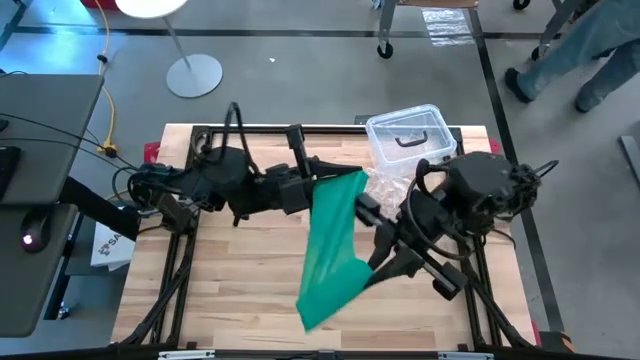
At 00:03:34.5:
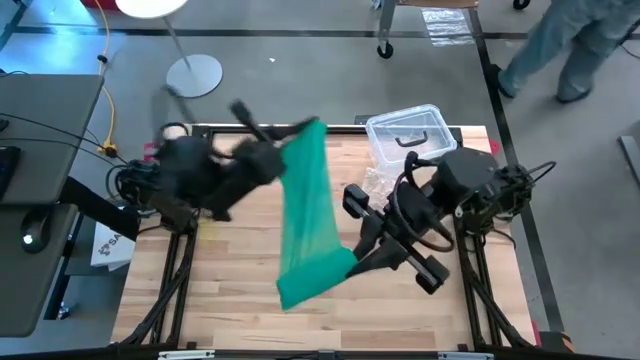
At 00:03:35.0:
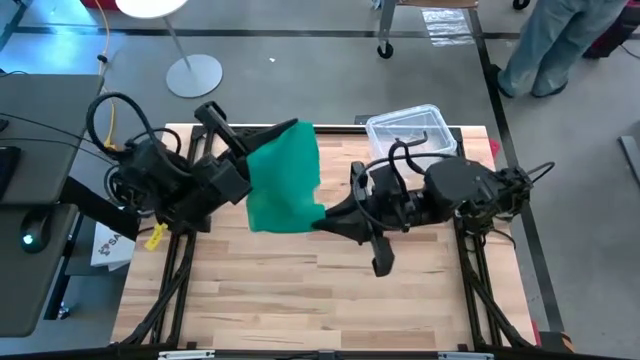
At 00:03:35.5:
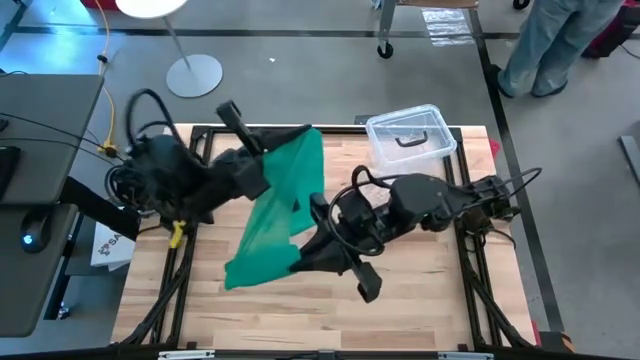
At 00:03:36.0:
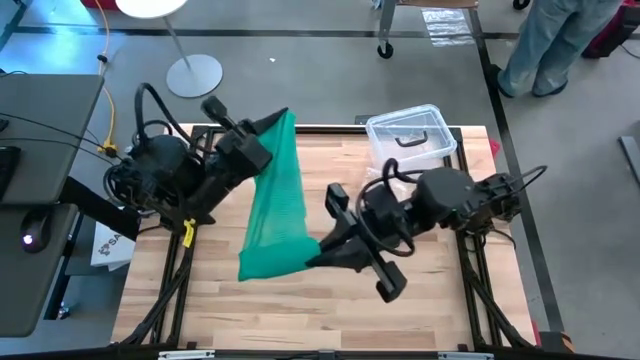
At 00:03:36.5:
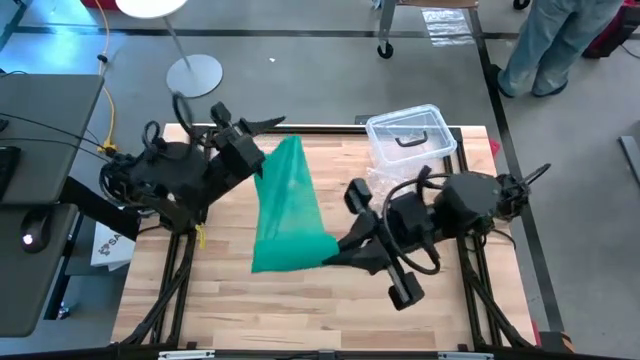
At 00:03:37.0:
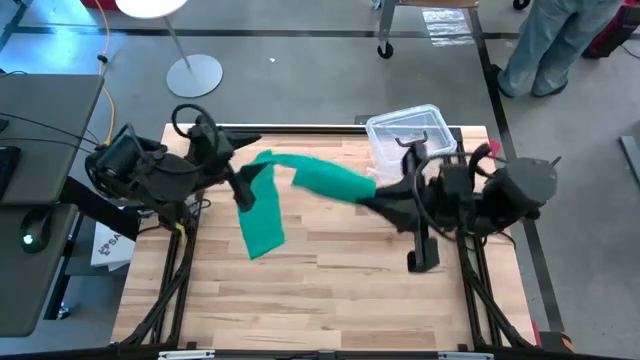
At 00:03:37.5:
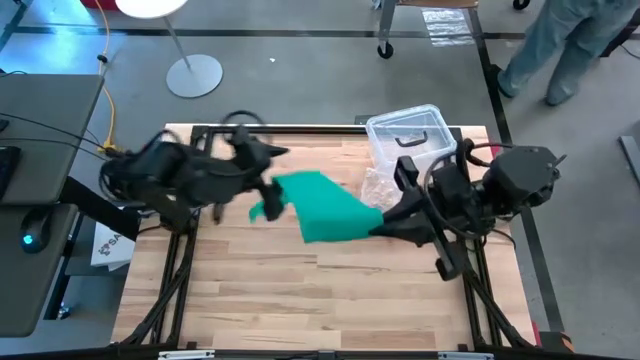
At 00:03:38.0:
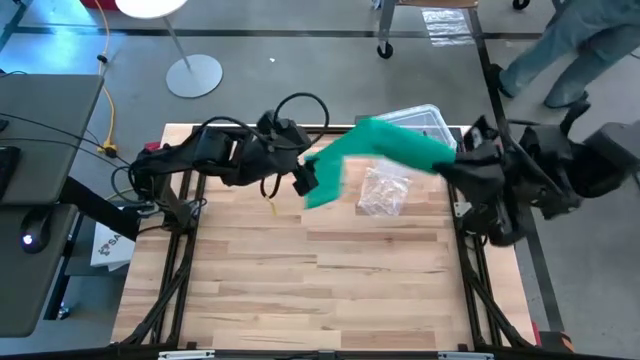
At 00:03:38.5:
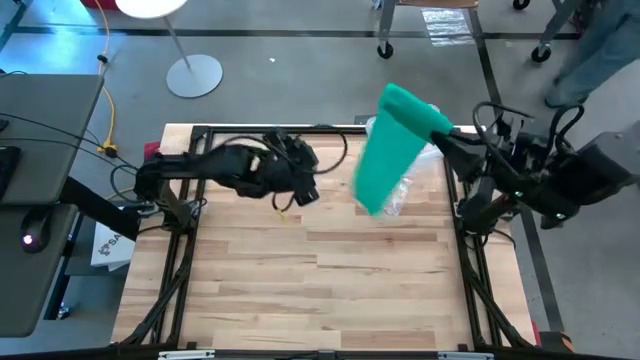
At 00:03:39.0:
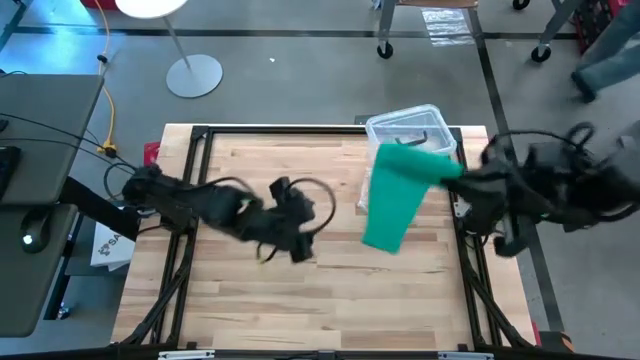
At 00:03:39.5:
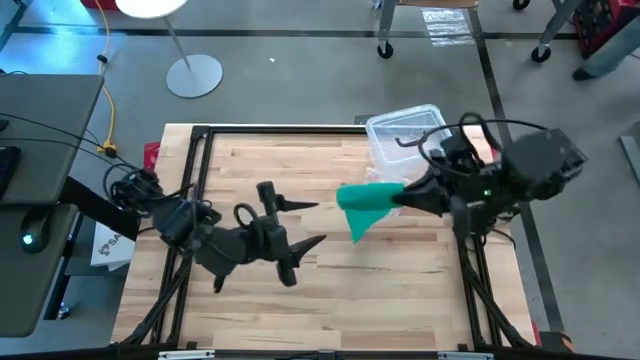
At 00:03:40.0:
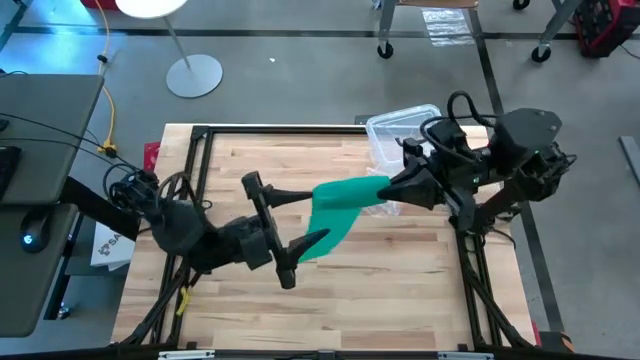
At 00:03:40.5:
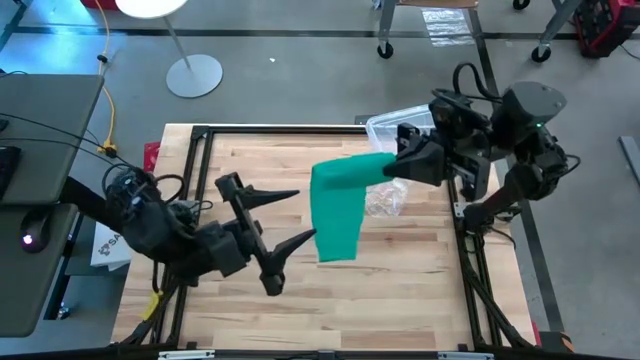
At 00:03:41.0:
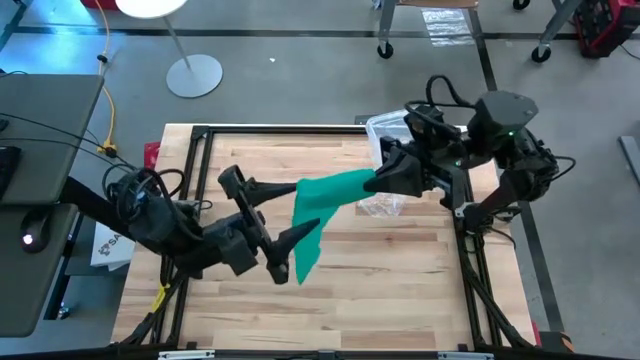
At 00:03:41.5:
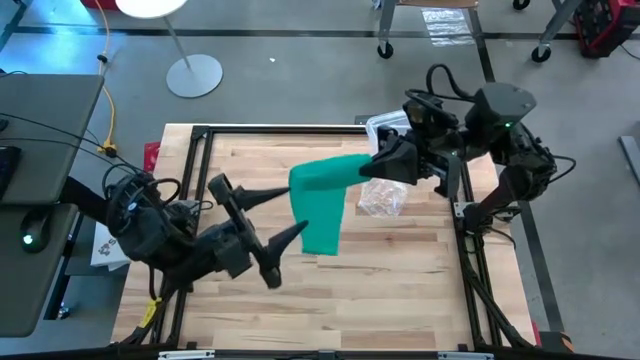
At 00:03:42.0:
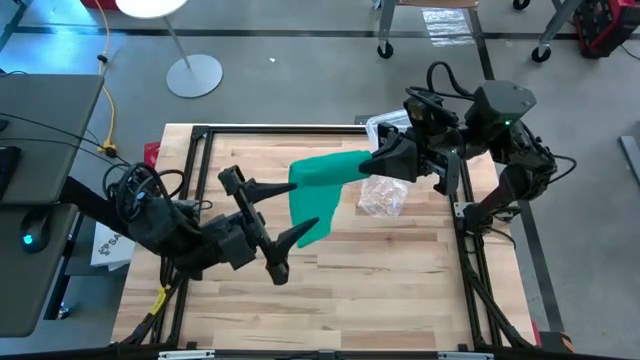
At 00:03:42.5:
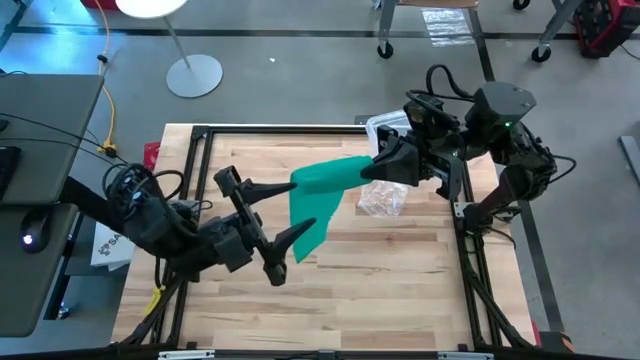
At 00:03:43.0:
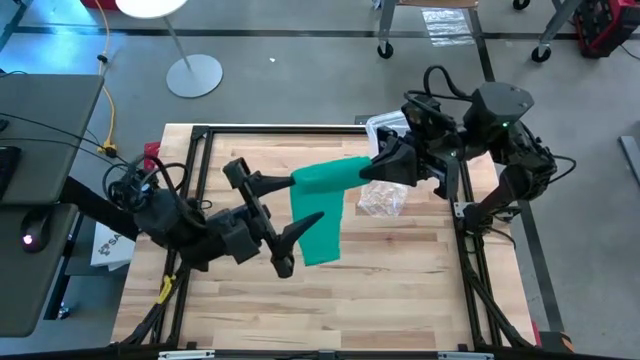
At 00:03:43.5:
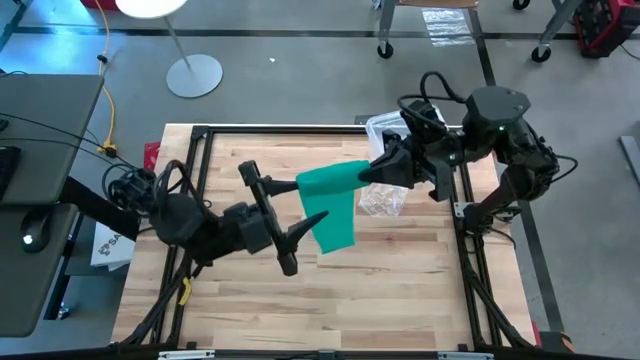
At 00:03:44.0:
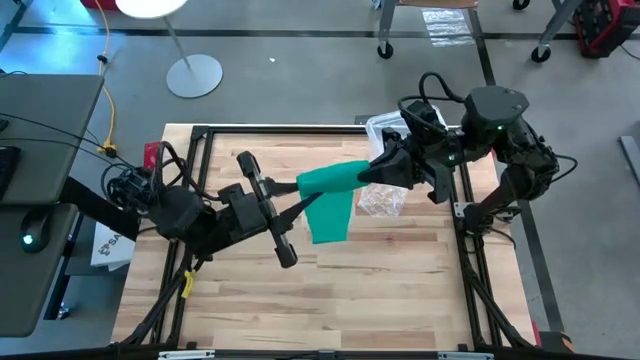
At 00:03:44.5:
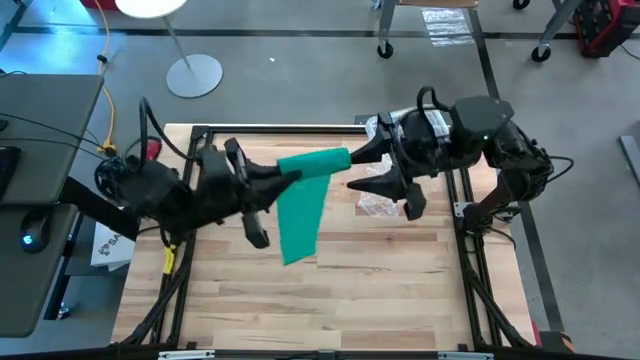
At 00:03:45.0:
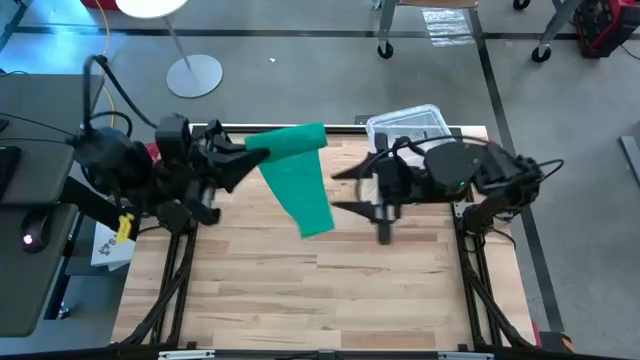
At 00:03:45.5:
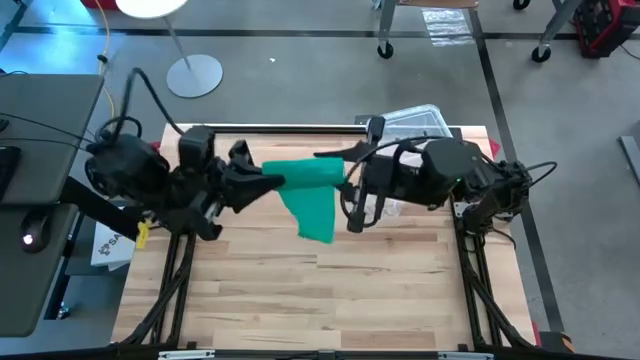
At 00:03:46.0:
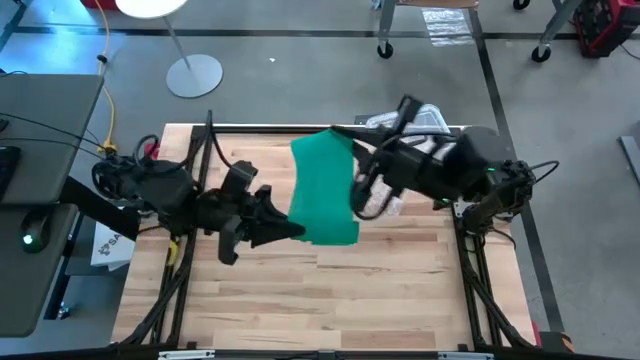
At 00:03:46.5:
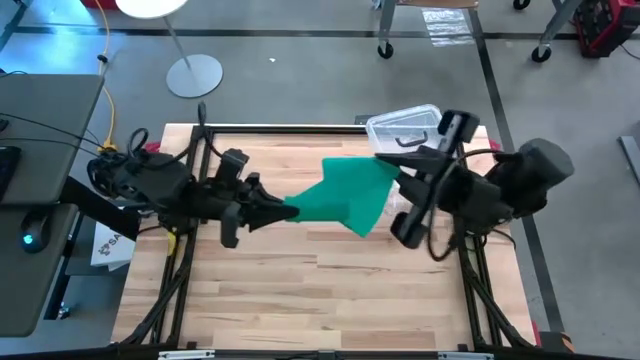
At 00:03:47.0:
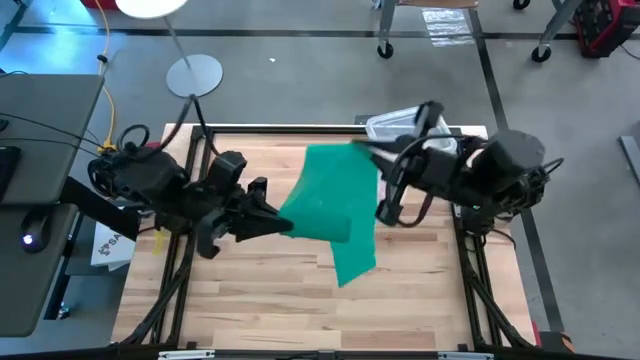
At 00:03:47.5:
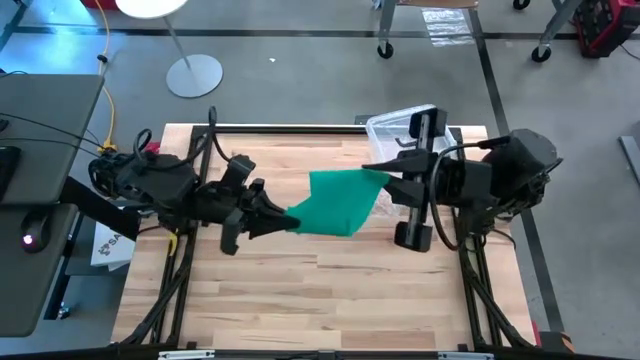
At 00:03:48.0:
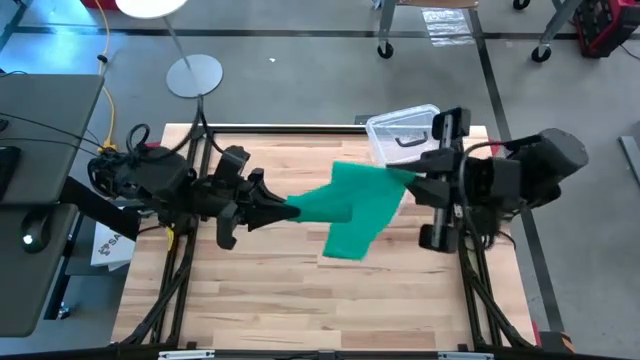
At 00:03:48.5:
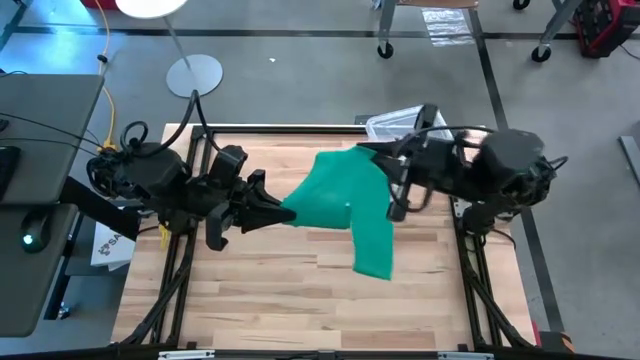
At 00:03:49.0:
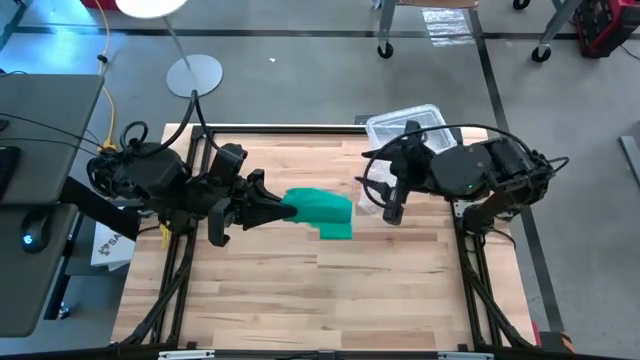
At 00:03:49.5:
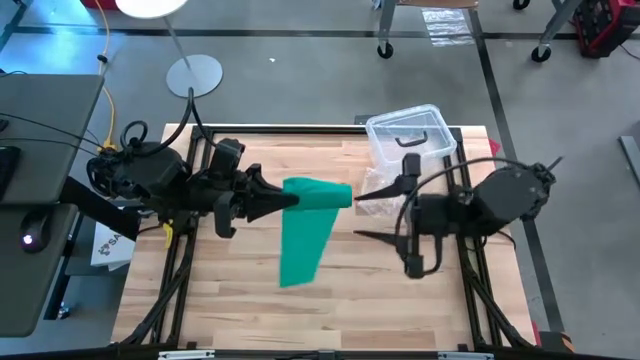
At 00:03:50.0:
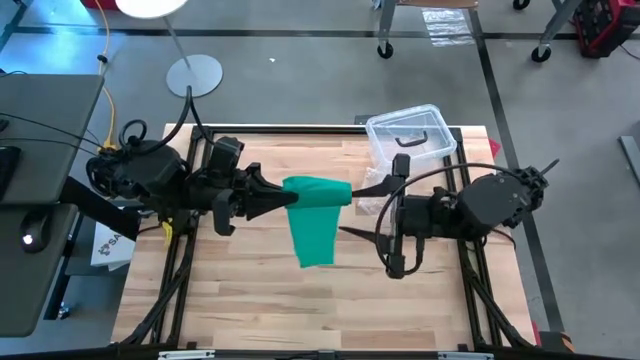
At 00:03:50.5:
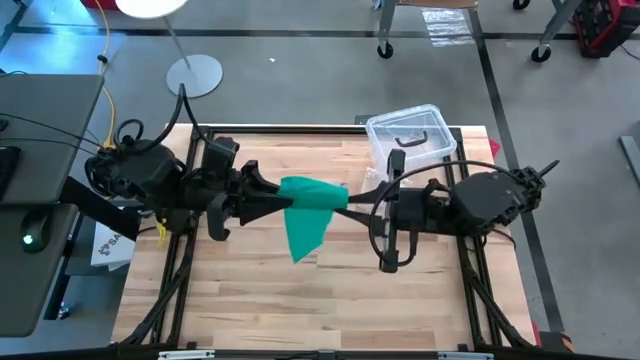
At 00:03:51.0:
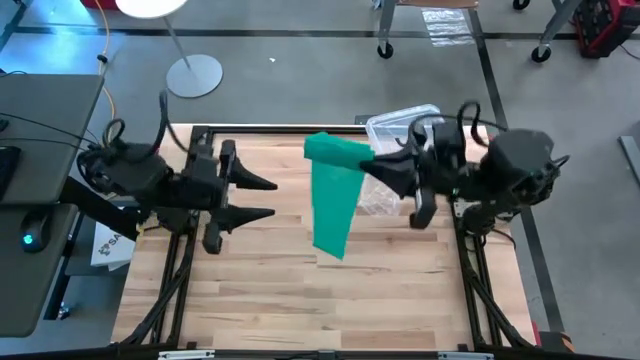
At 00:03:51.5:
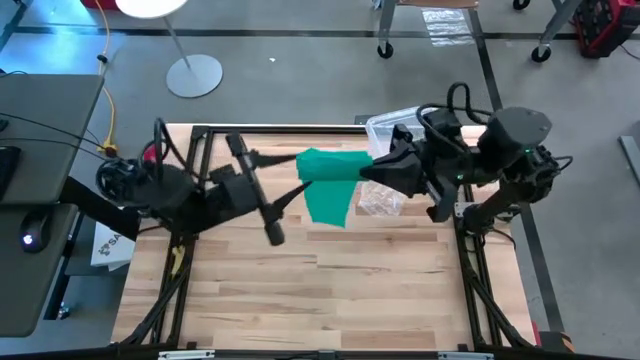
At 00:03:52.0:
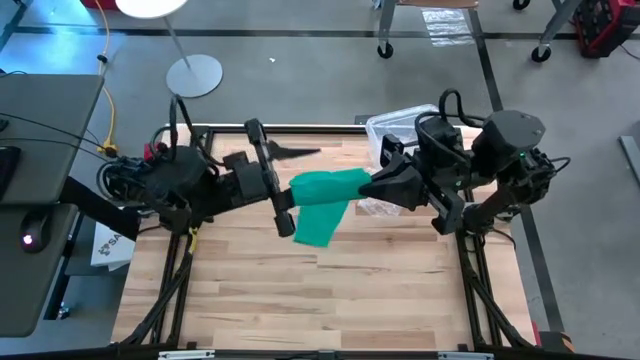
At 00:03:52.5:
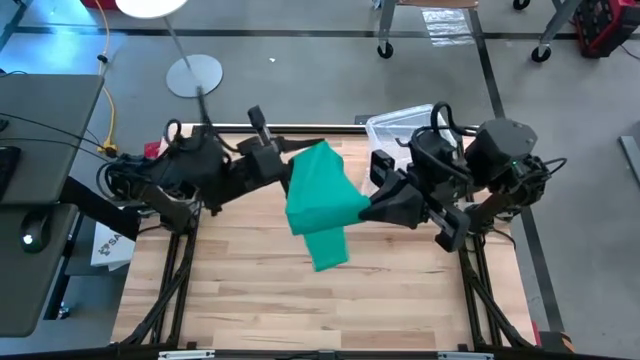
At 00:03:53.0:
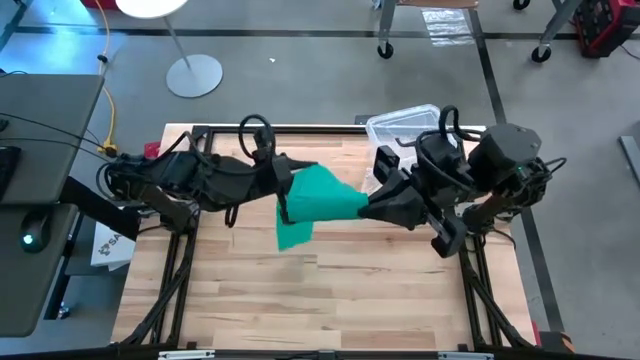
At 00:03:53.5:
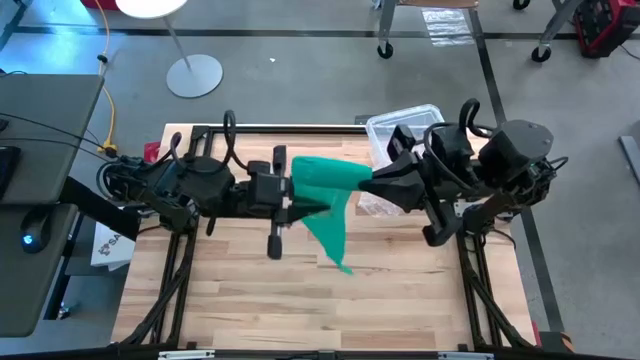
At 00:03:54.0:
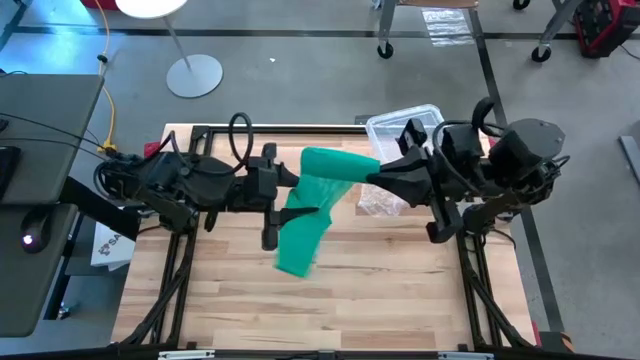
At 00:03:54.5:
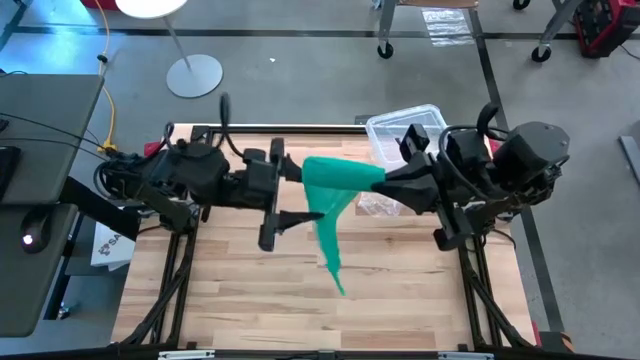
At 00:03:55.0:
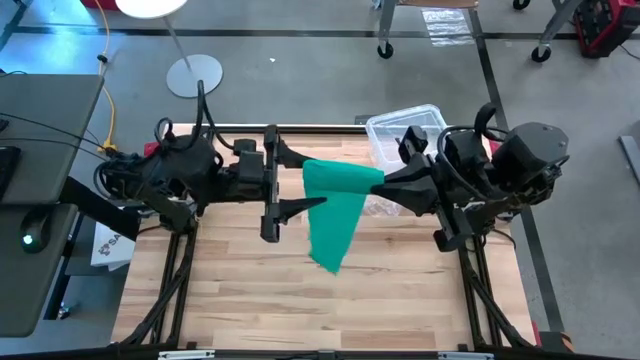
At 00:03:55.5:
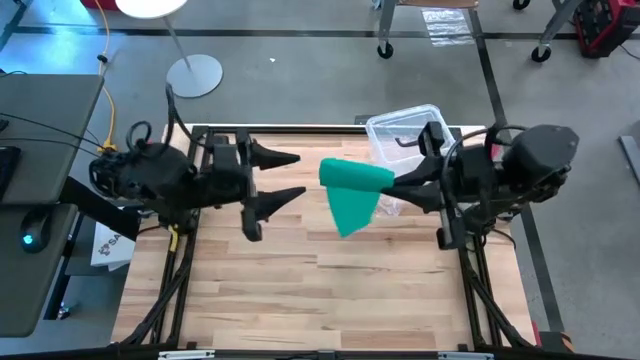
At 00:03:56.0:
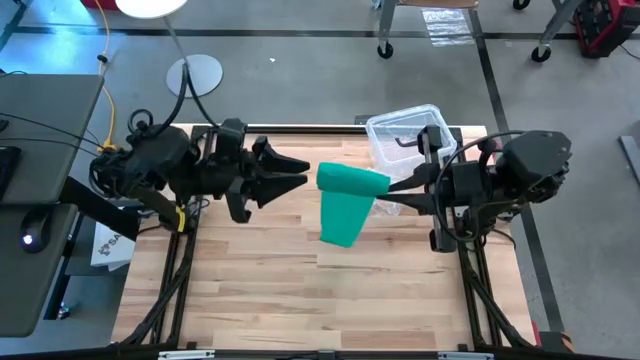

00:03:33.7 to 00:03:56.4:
Task: Roll bandage
Roll the green bandage
